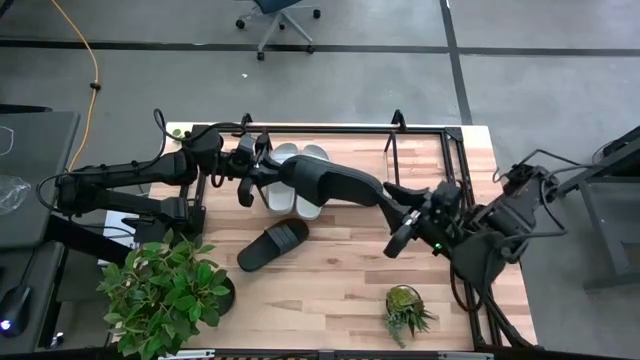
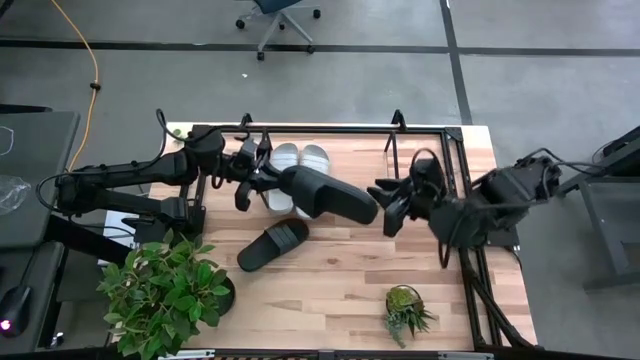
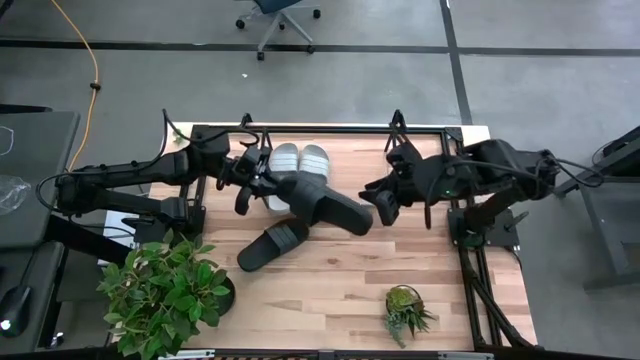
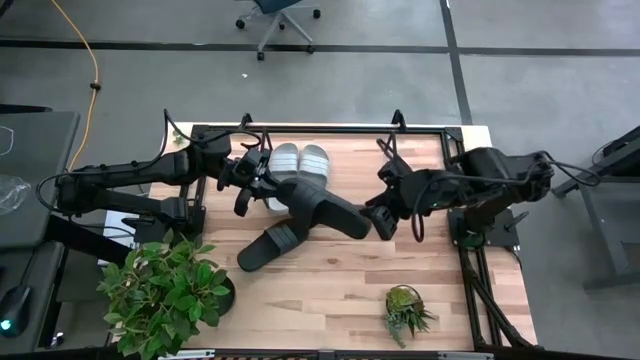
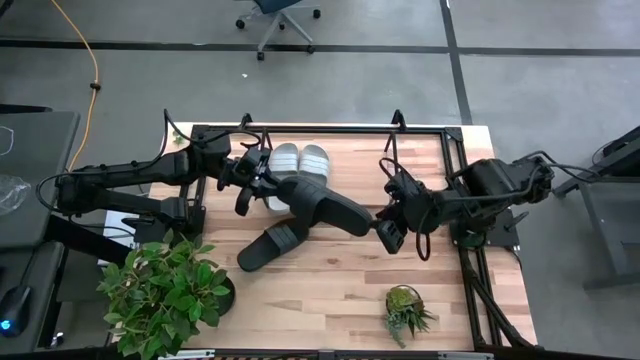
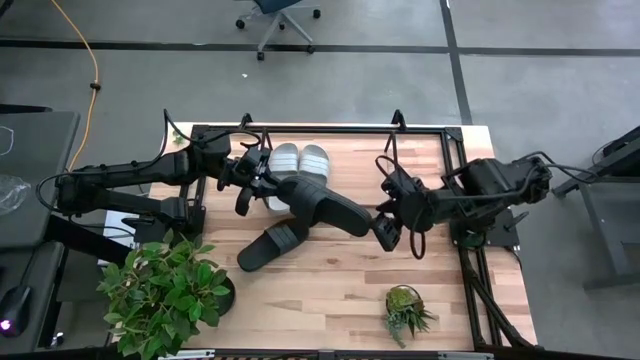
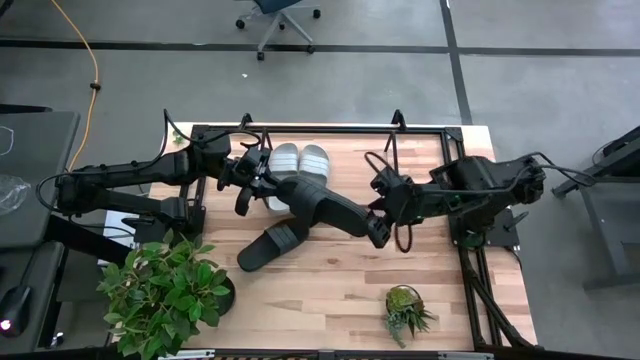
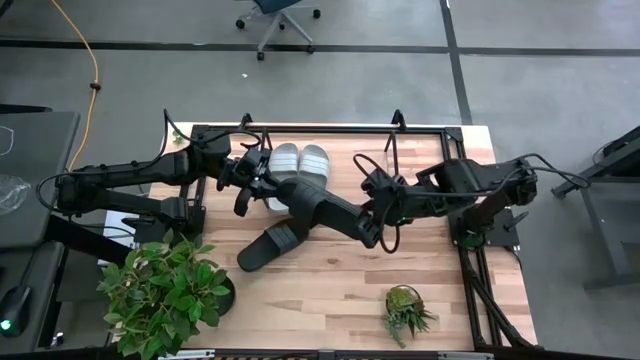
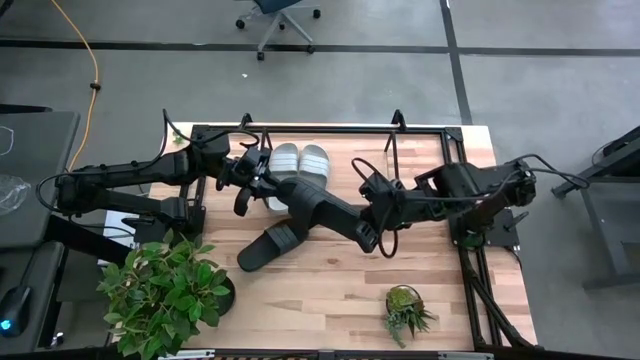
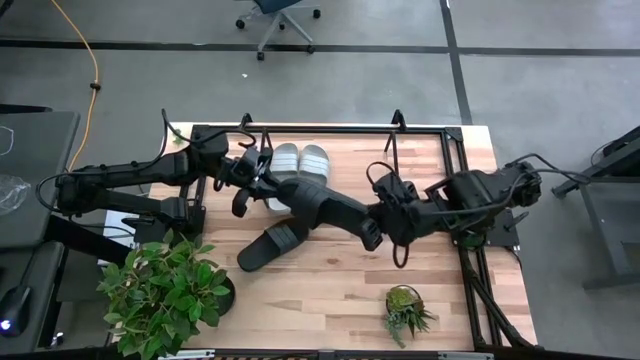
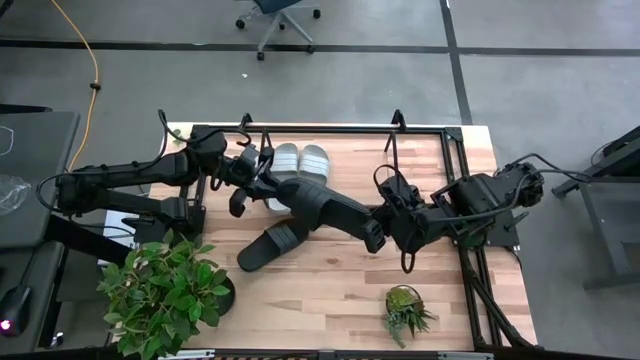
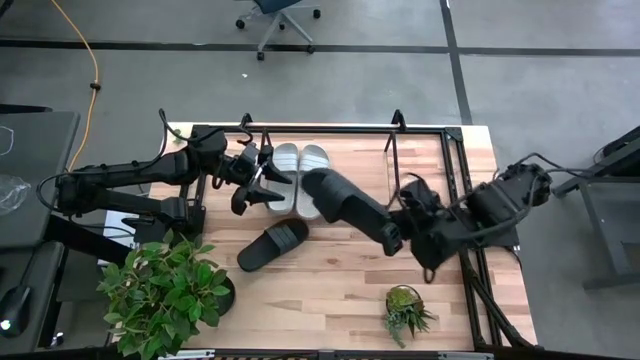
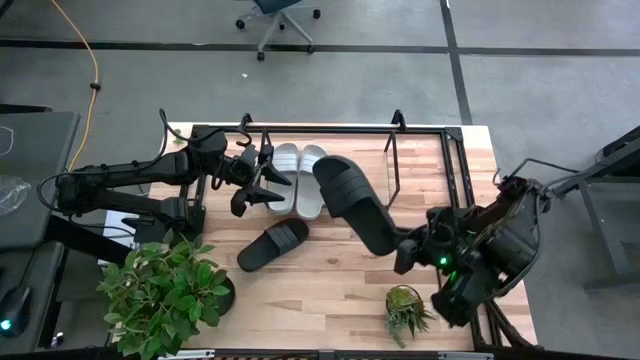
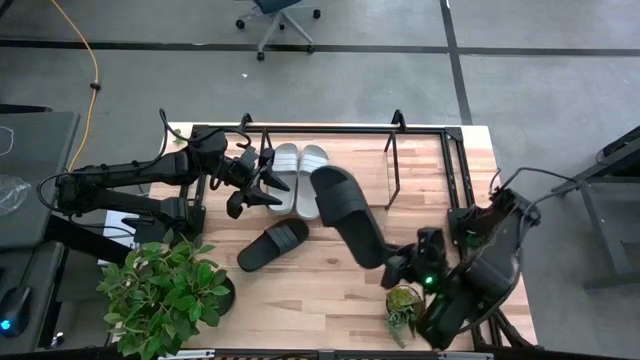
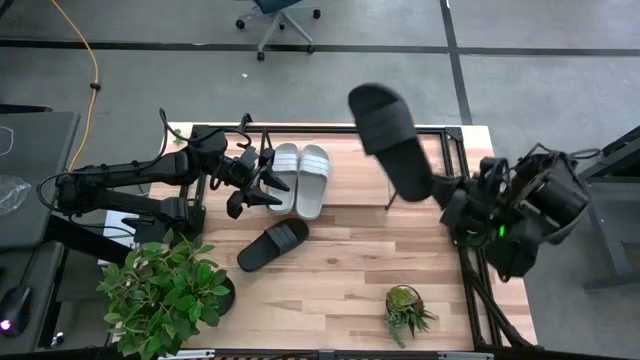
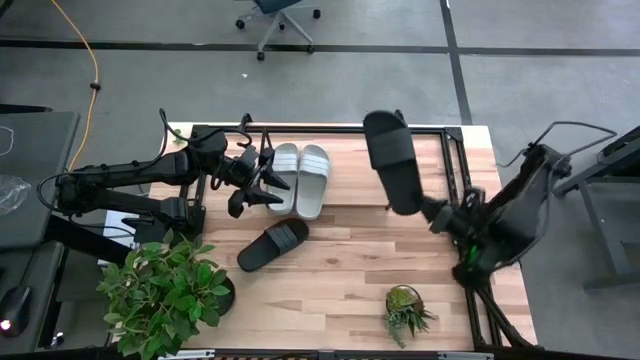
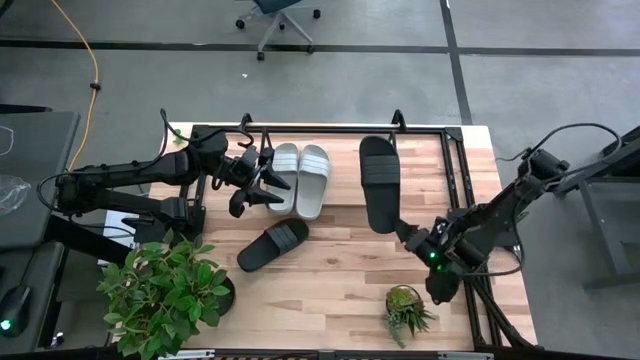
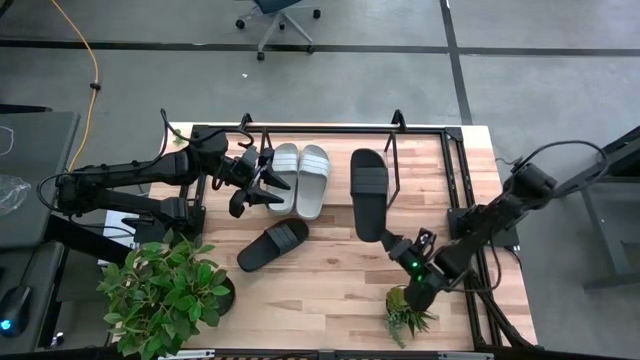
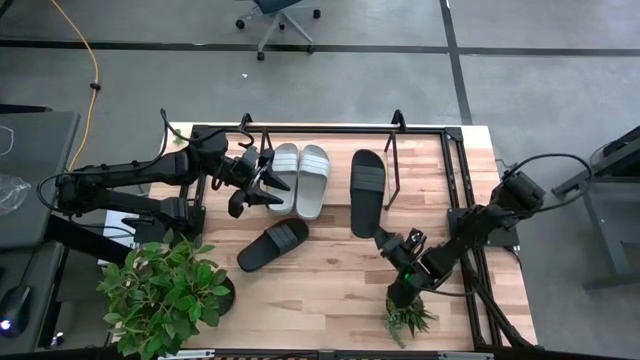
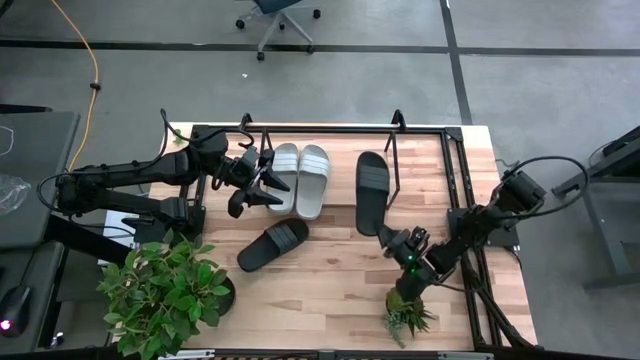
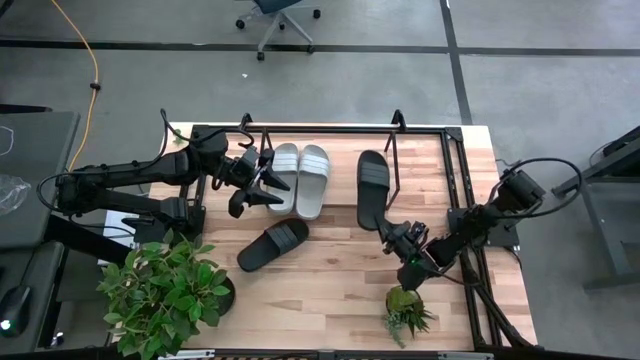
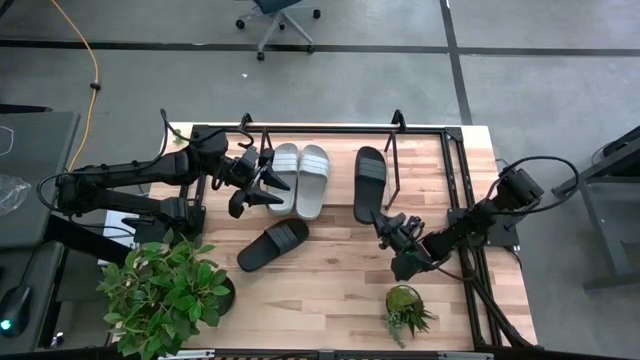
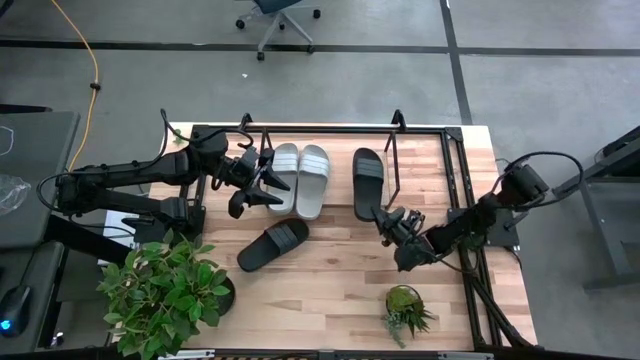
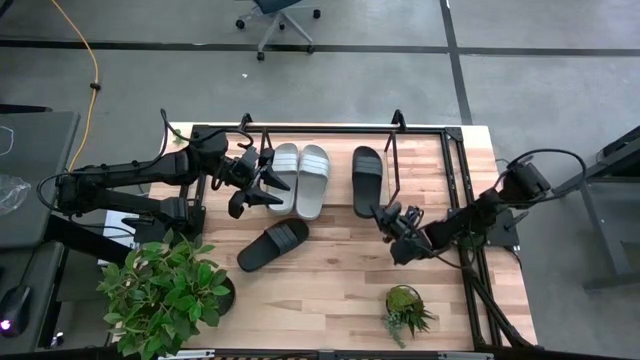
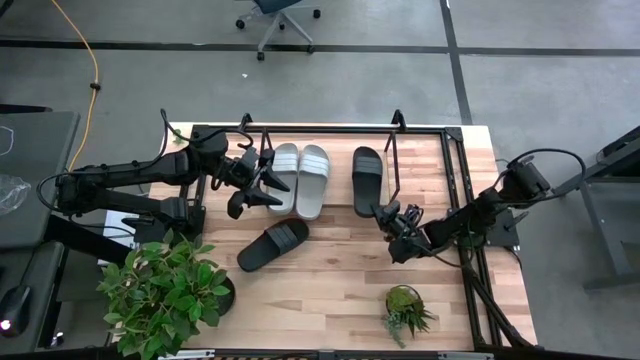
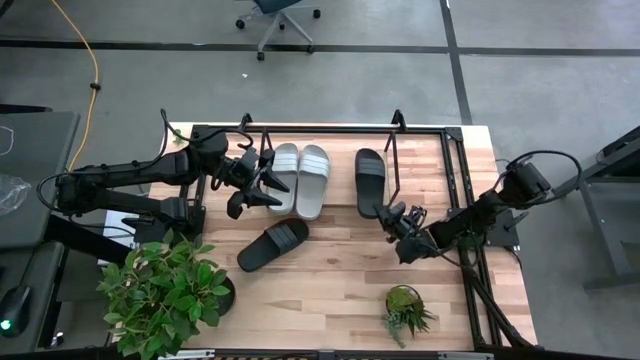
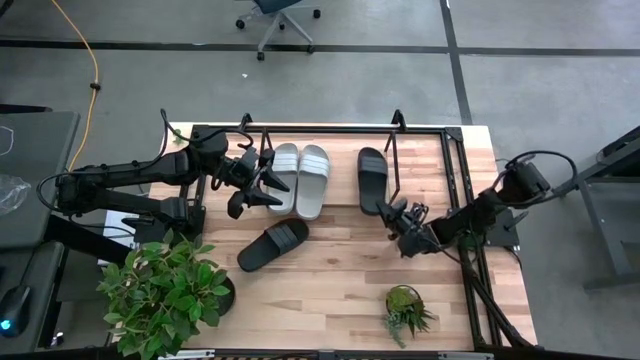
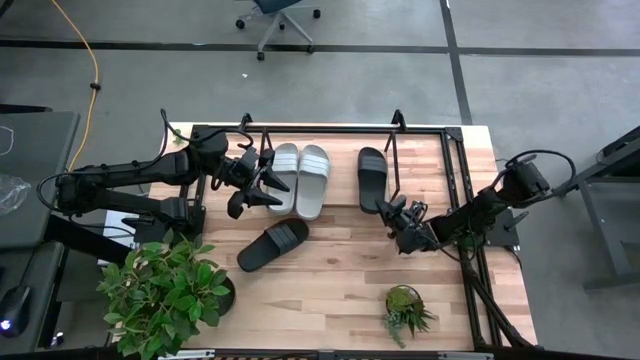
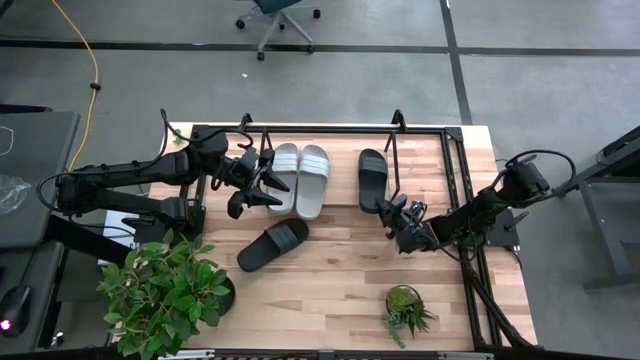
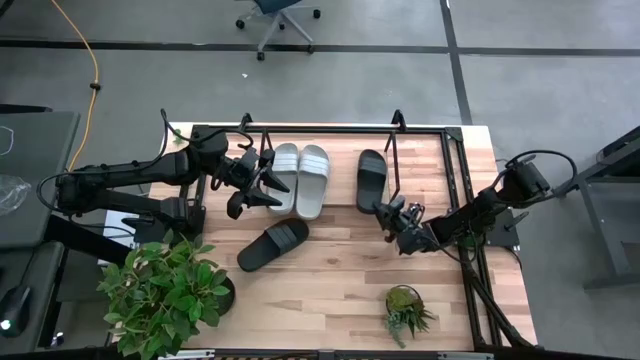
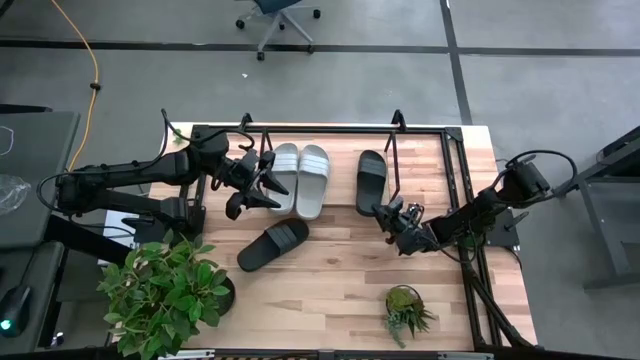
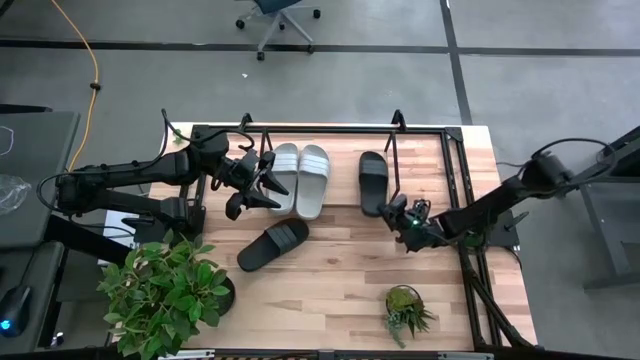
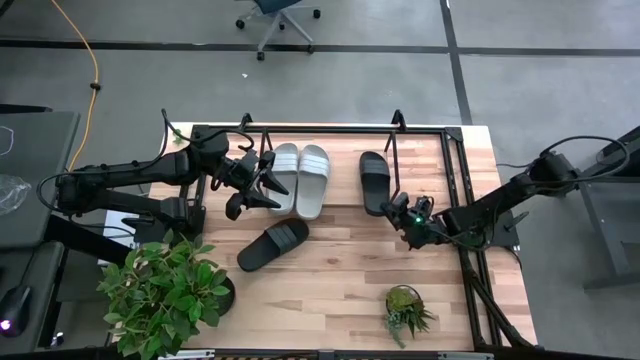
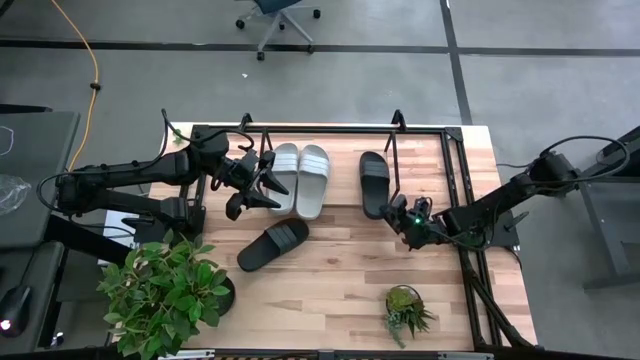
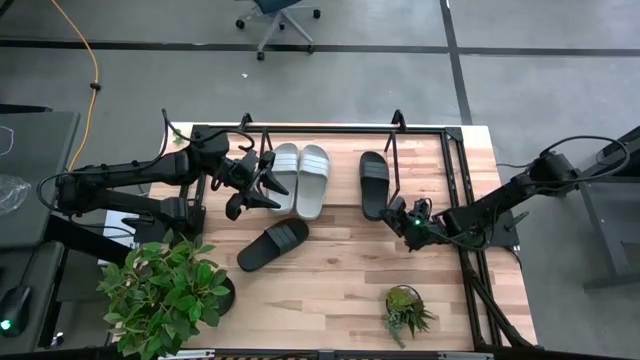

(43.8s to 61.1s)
Task: Pick and place slides into the shelf
Put the bottom black slide on the shelf

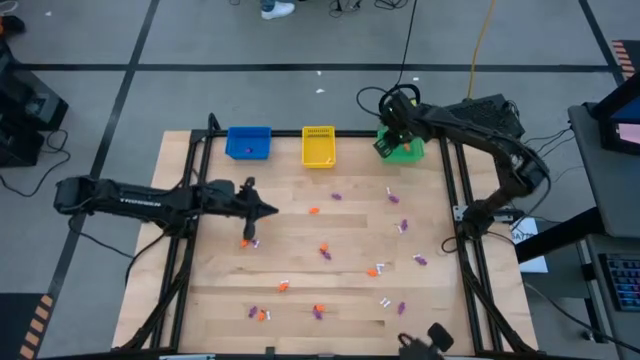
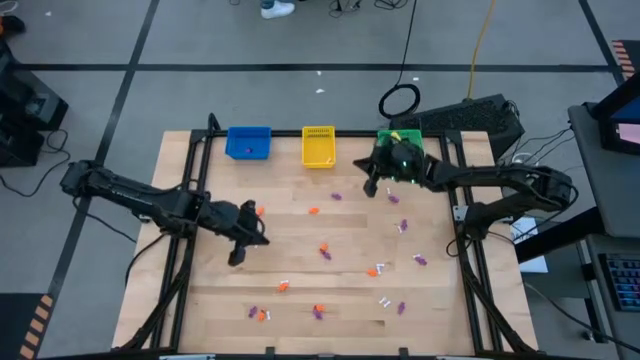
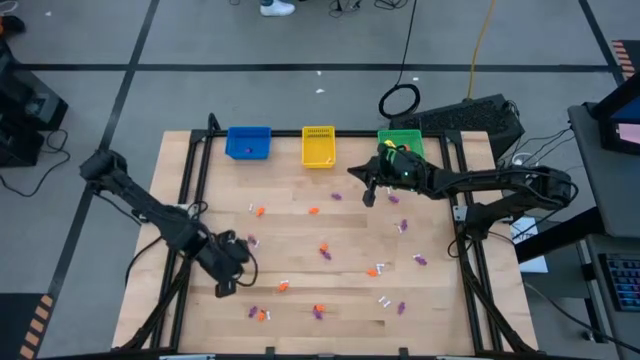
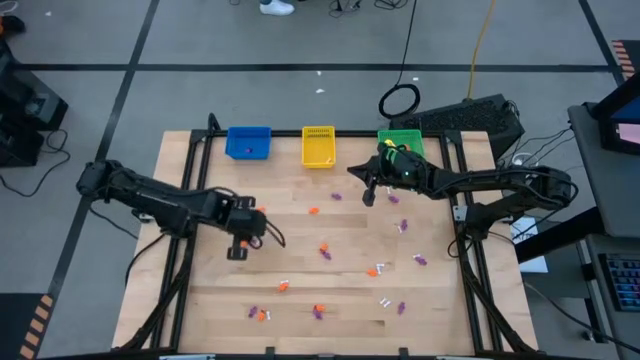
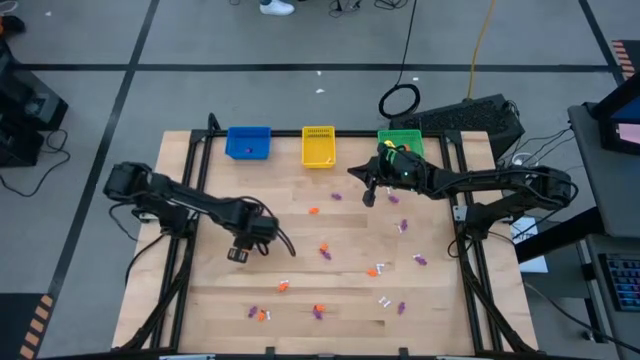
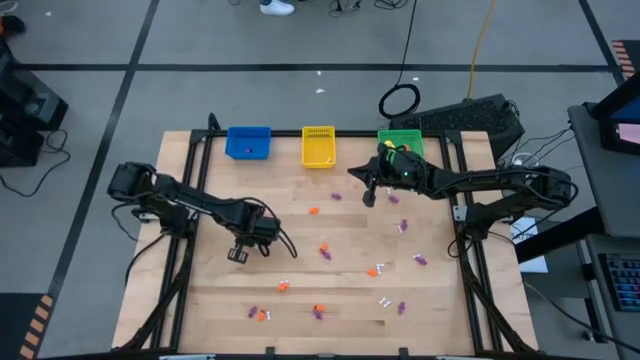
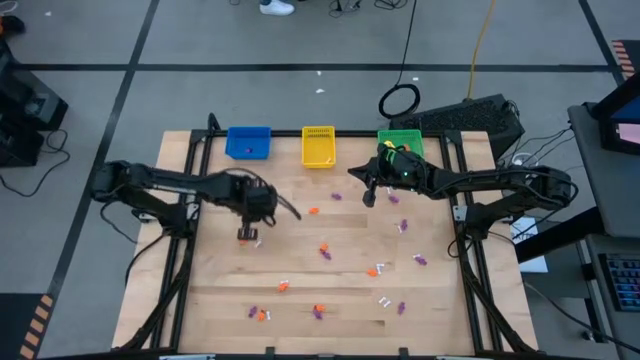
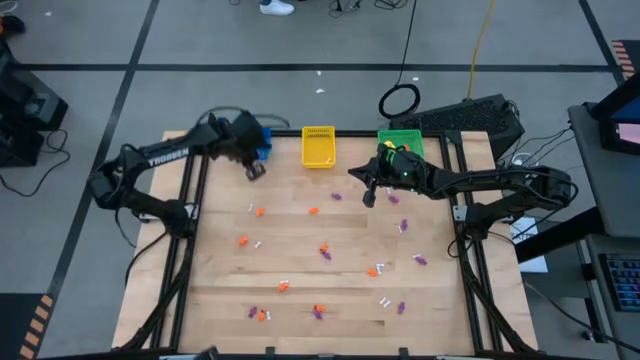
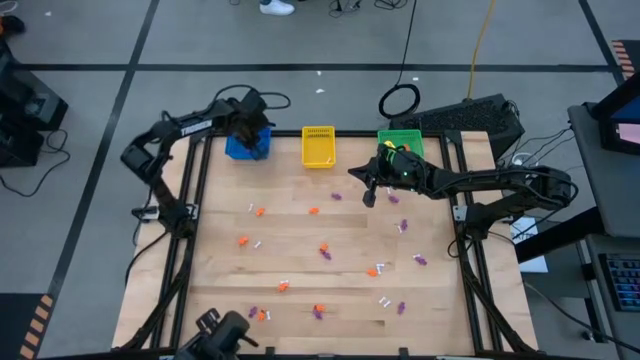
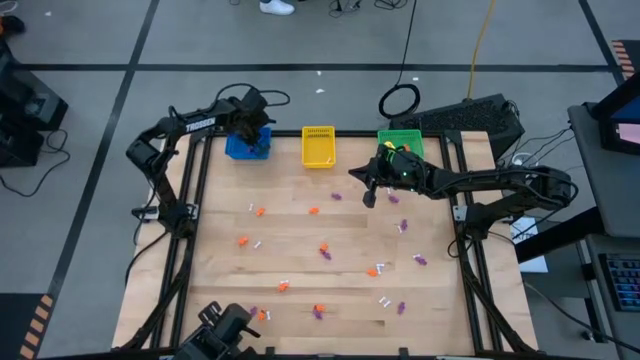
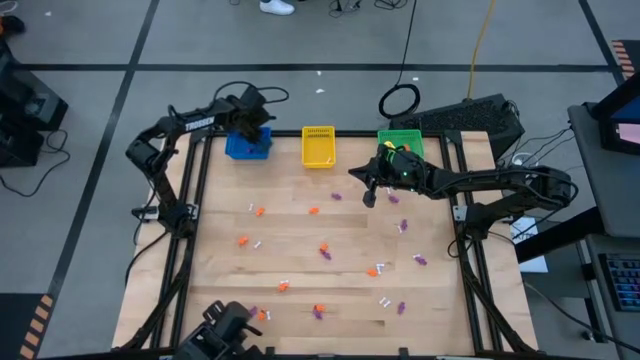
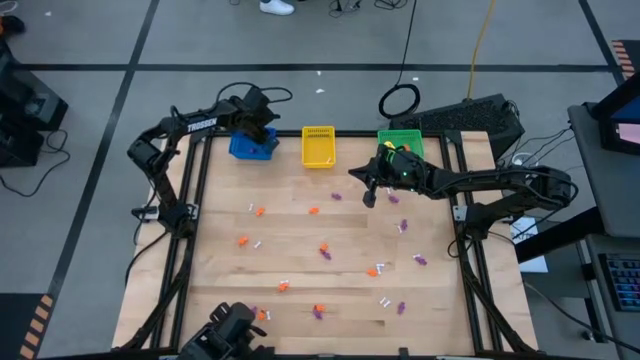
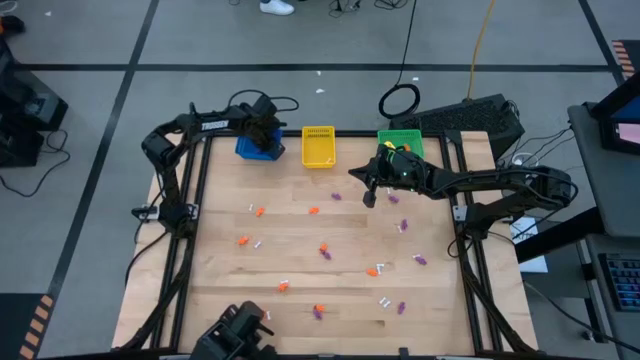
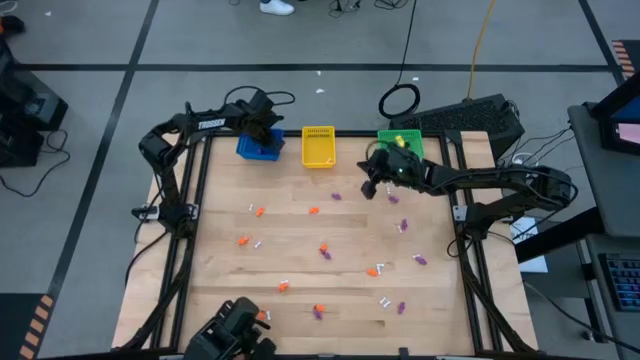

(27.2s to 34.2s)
Task: Sort Halloween decoration
Put the violet skeleton toy into the blue bin
